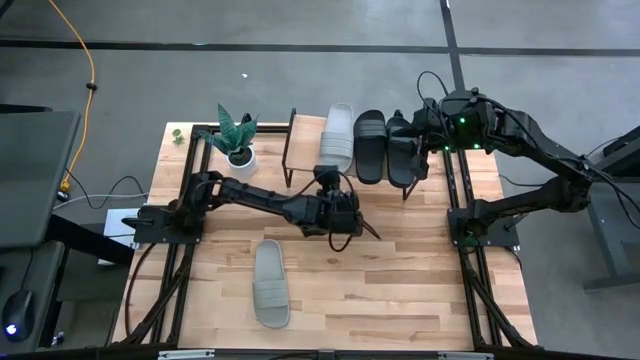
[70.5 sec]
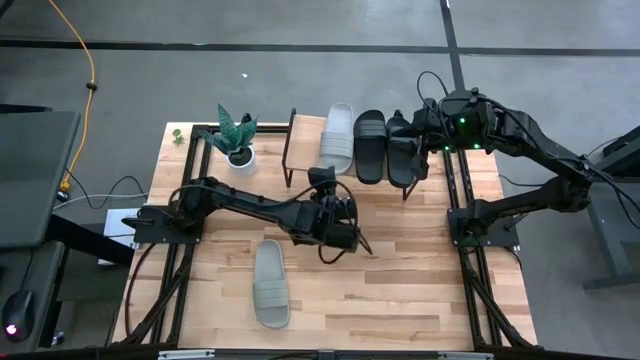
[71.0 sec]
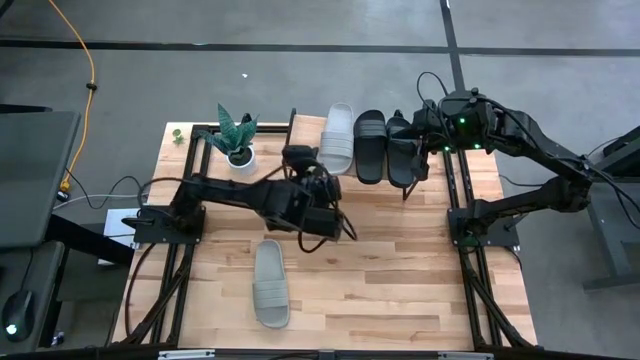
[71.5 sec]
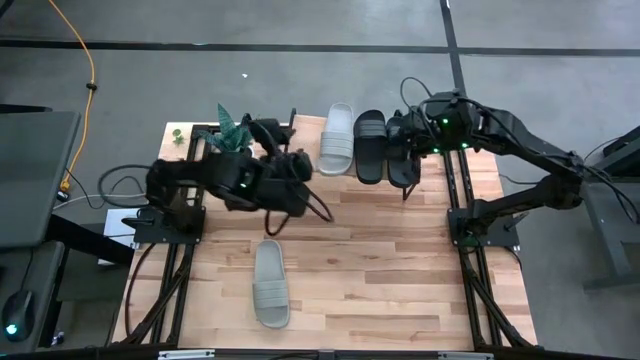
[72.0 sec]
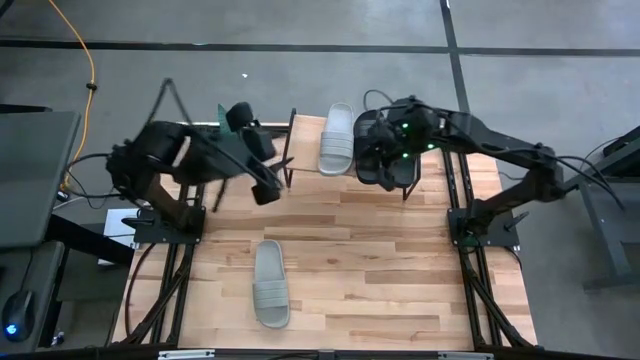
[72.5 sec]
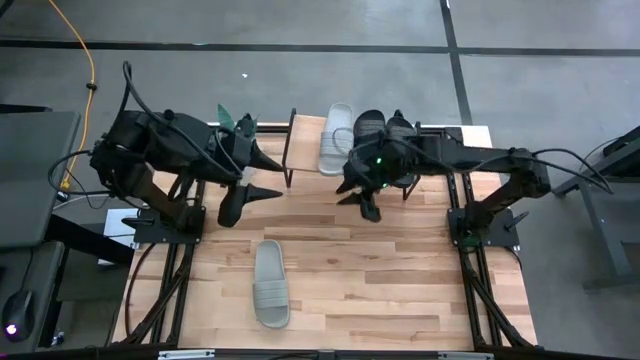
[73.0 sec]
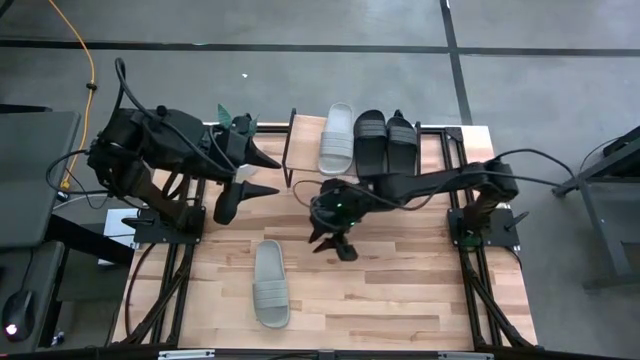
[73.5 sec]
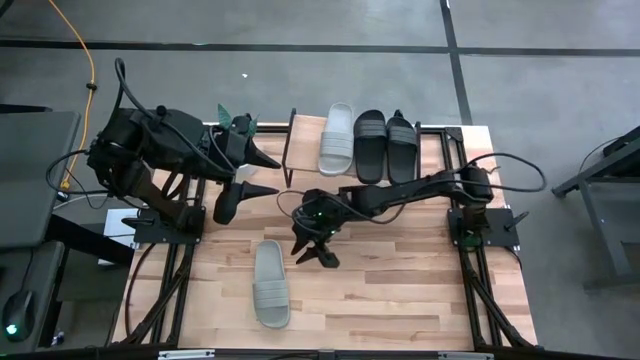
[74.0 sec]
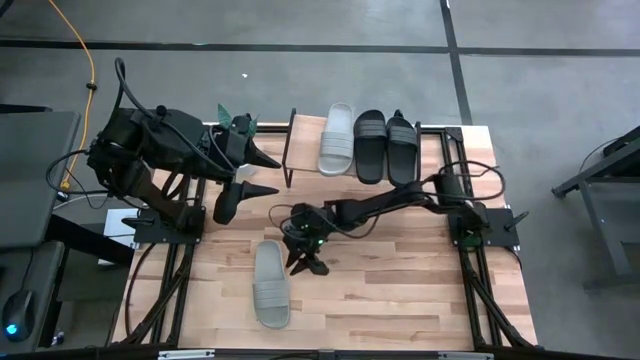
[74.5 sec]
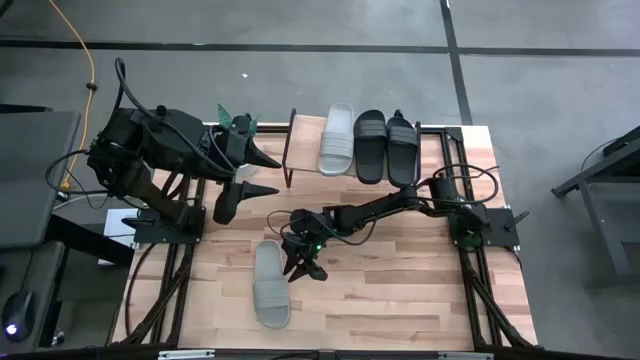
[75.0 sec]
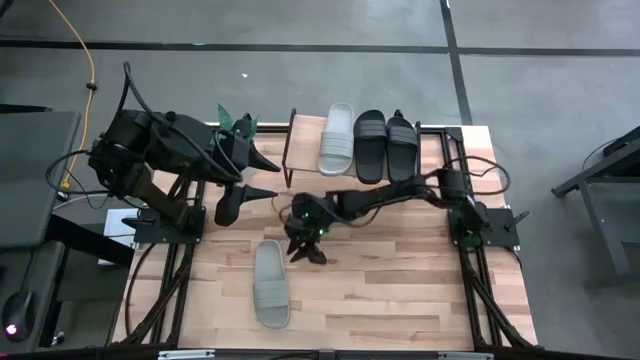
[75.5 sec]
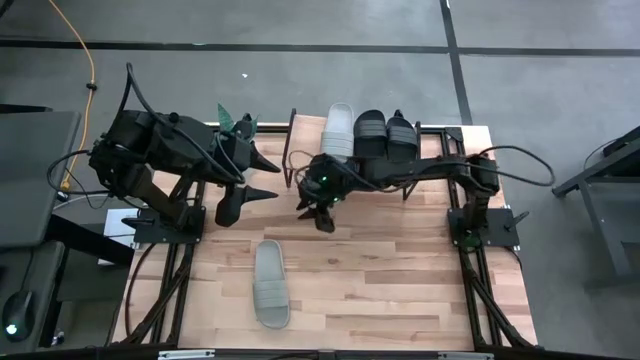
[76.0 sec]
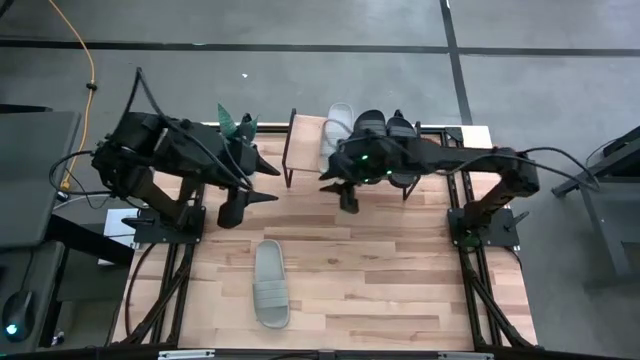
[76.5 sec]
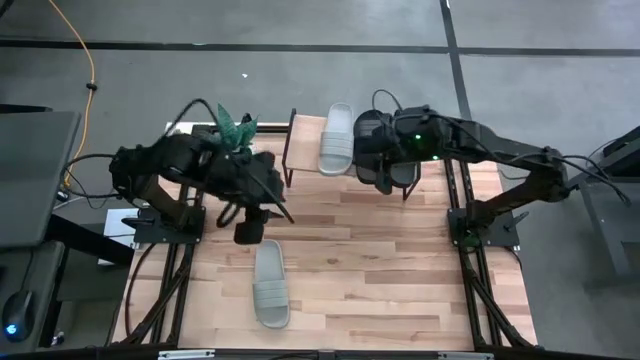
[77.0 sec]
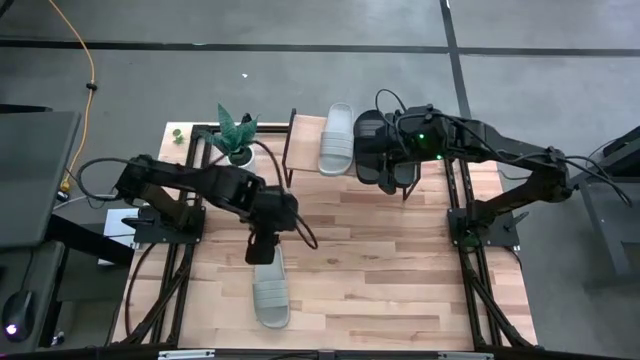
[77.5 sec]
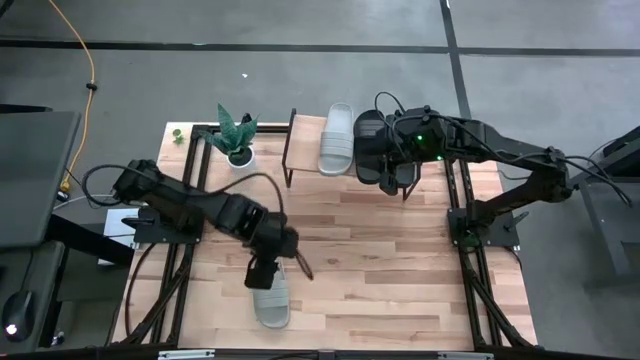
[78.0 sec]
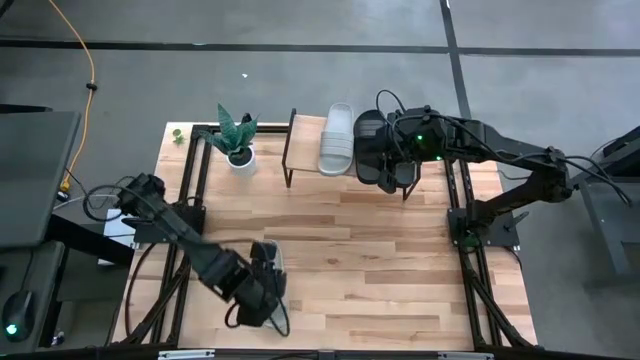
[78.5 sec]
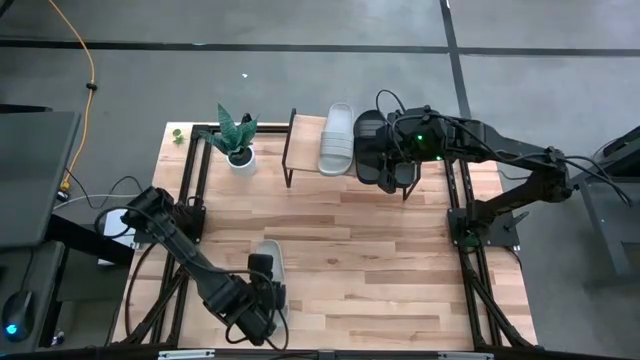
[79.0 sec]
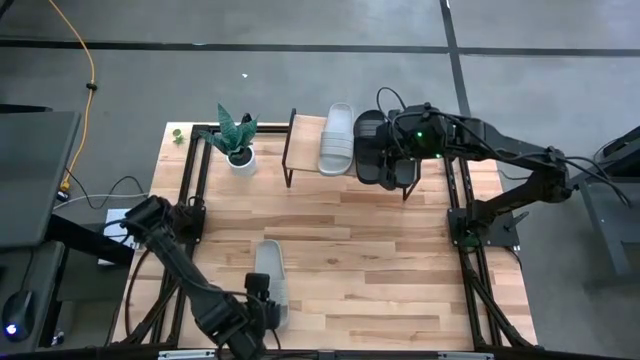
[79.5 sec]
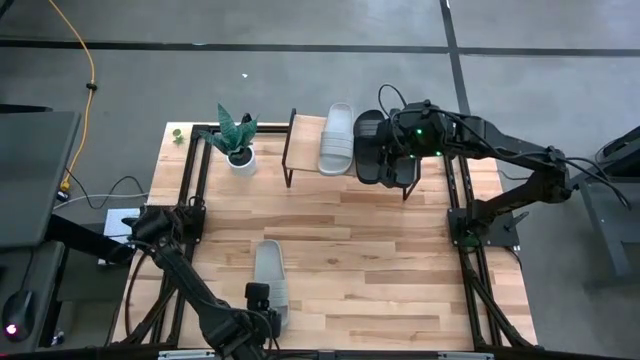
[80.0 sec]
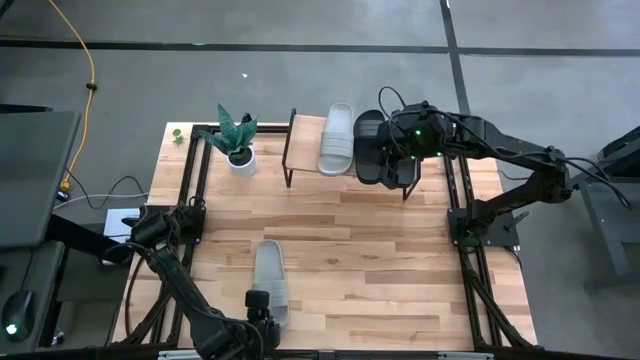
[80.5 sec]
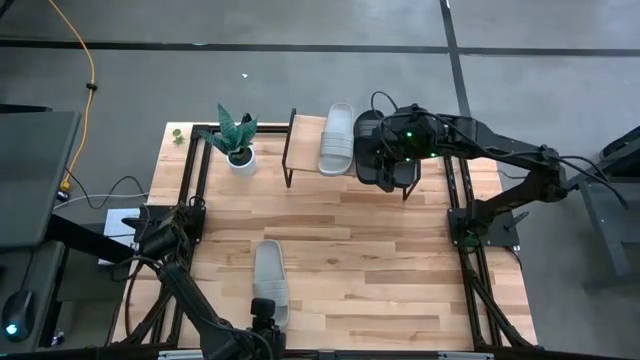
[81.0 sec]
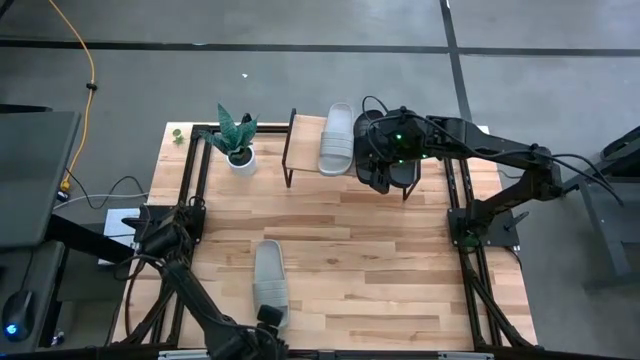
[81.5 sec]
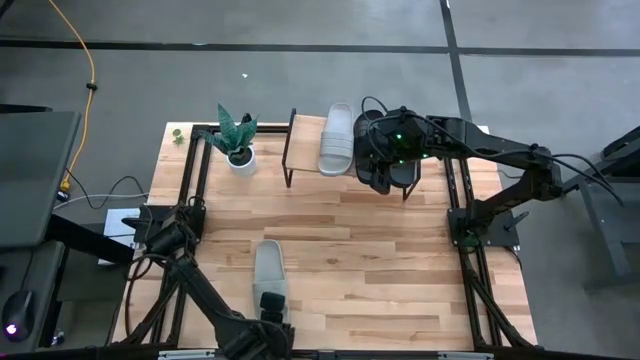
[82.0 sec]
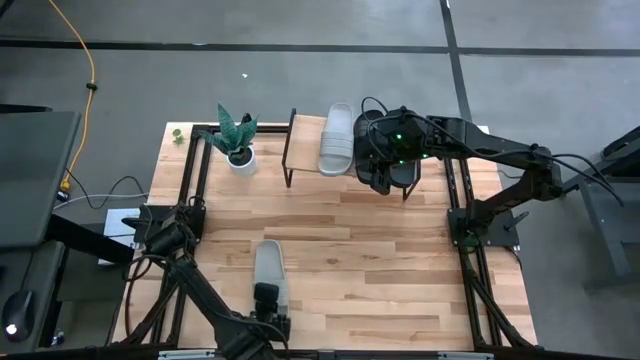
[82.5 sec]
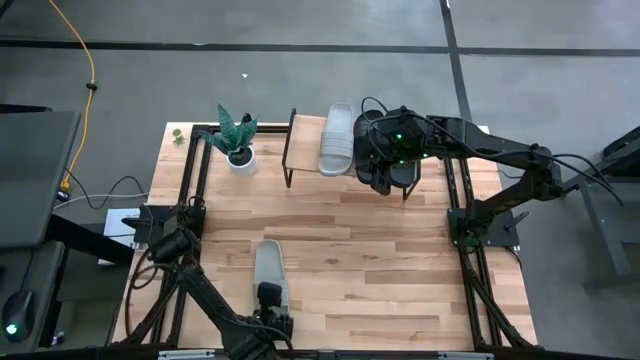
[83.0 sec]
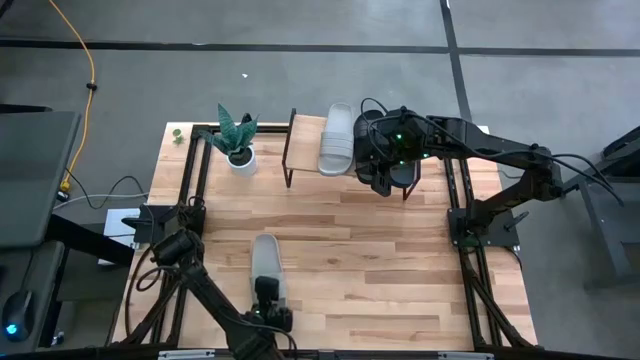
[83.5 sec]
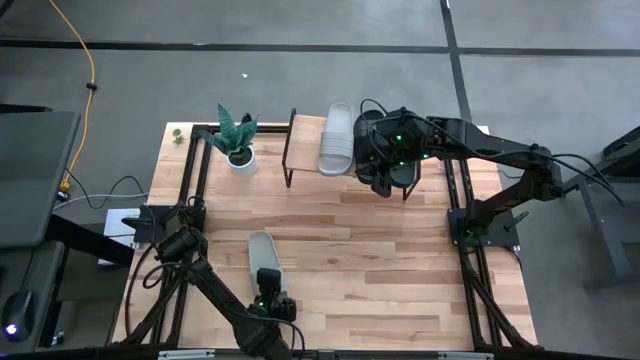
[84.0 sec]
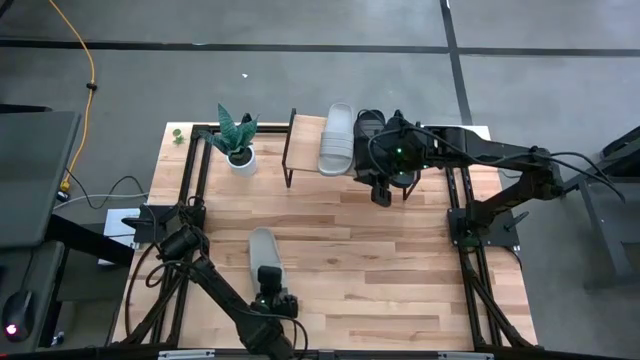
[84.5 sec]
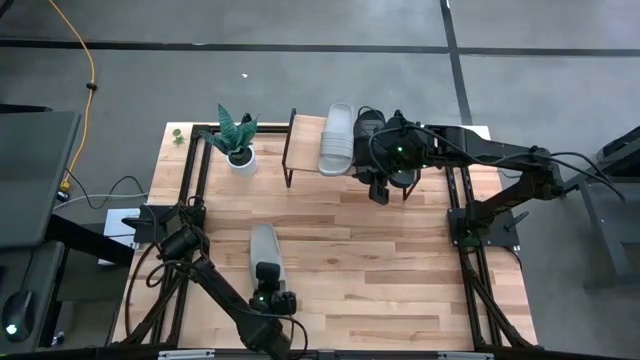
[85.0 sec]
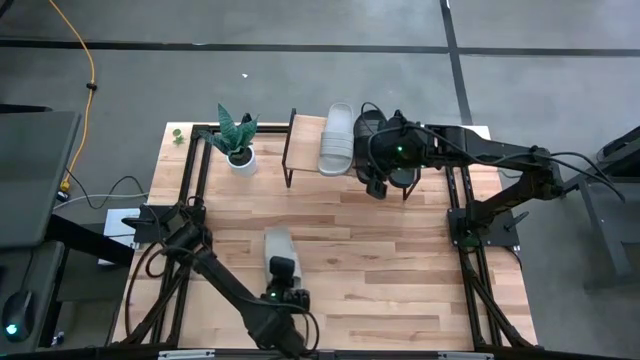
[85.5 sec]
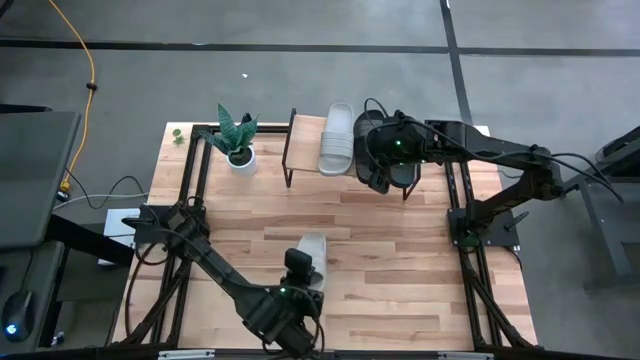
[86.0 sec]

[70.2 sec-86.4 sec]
Task: Pick and place slides into the shelf
Put the gray slide on the shelf

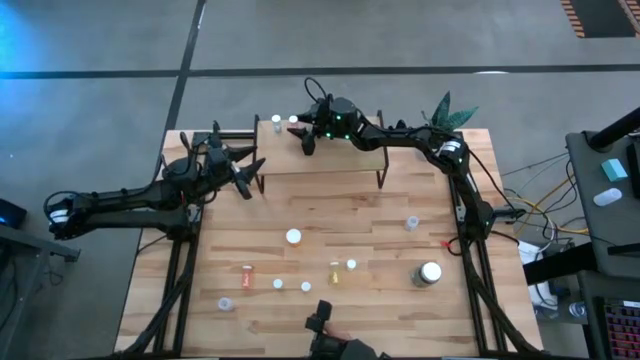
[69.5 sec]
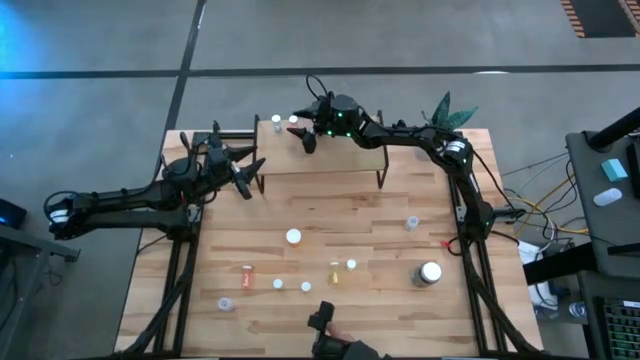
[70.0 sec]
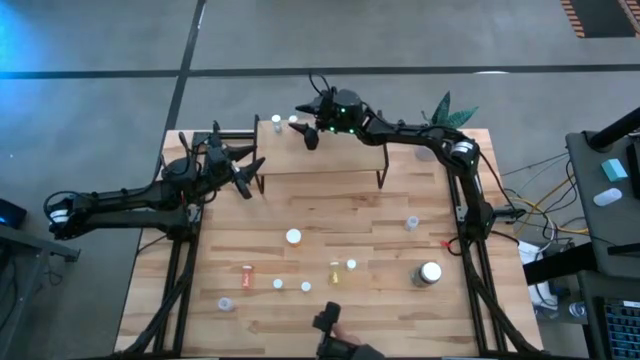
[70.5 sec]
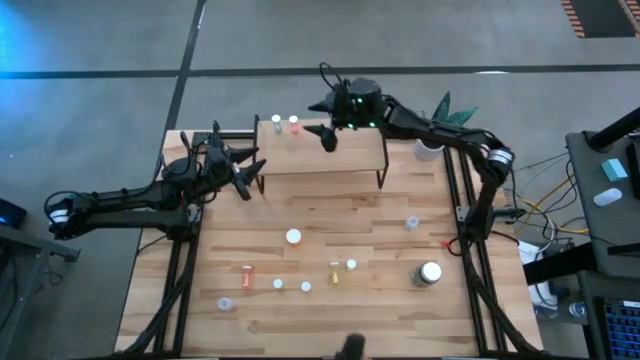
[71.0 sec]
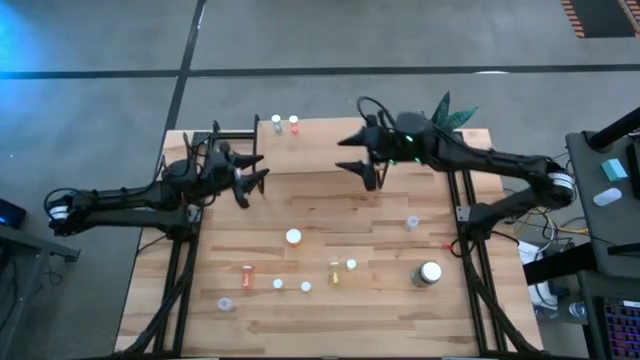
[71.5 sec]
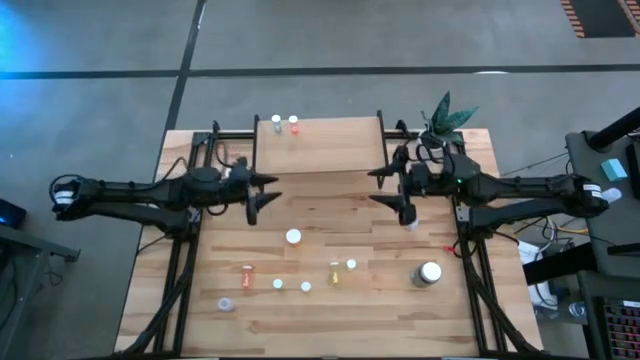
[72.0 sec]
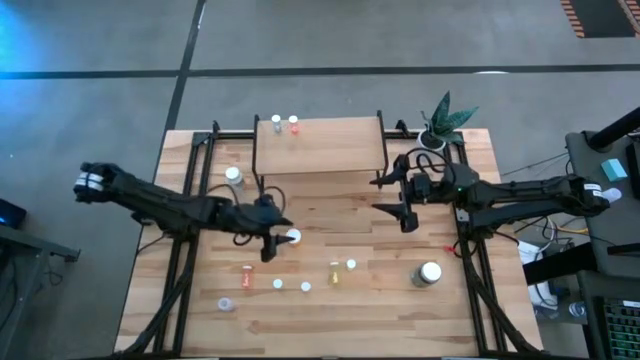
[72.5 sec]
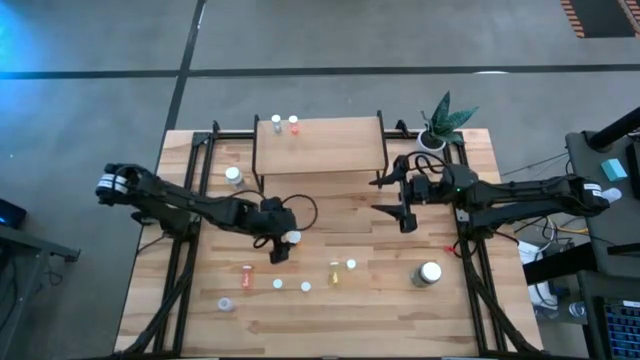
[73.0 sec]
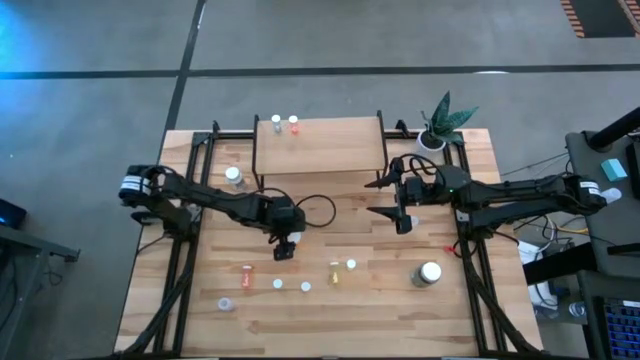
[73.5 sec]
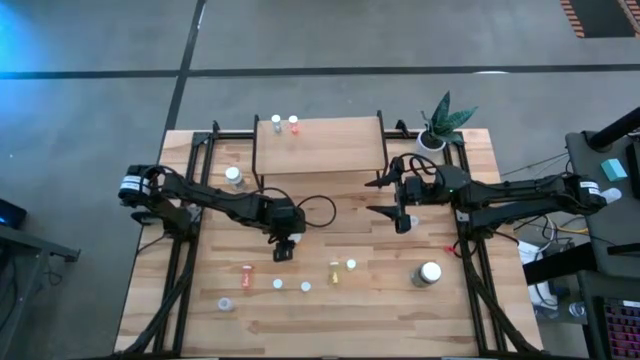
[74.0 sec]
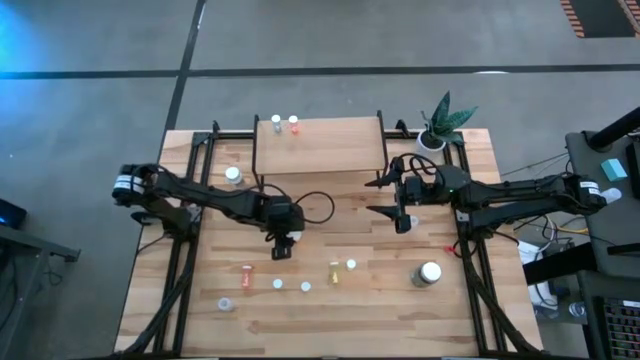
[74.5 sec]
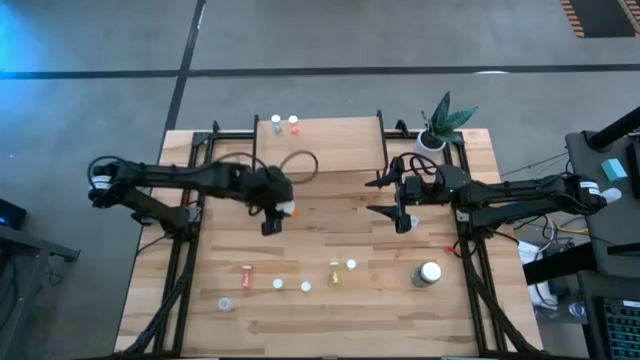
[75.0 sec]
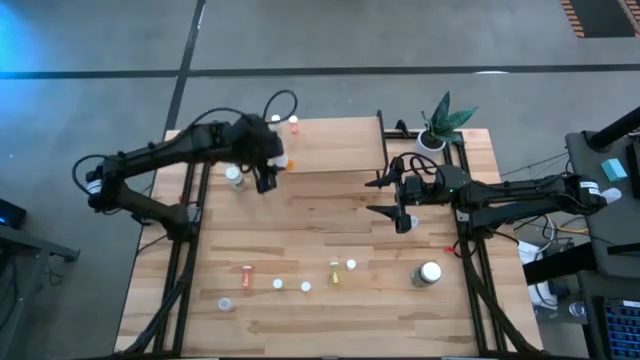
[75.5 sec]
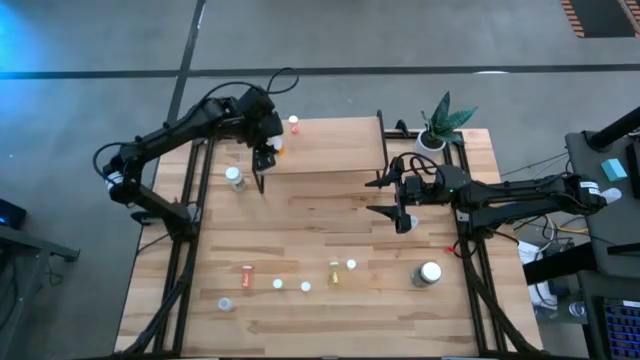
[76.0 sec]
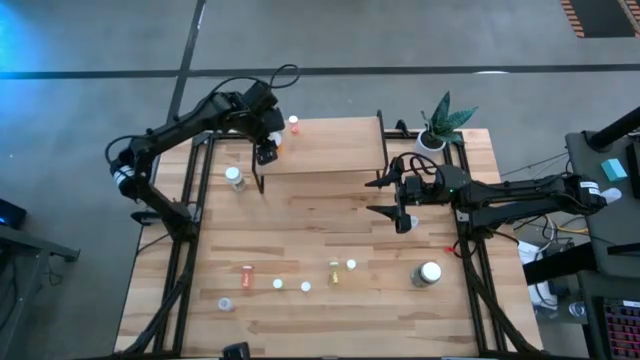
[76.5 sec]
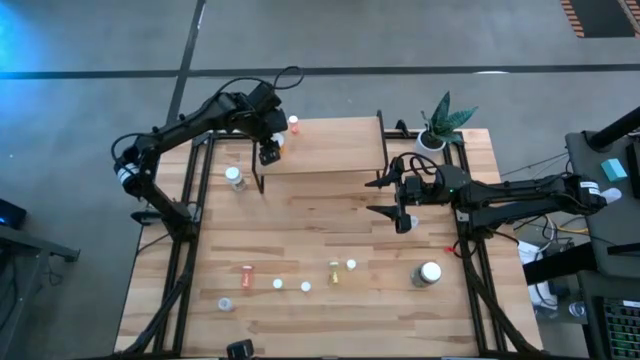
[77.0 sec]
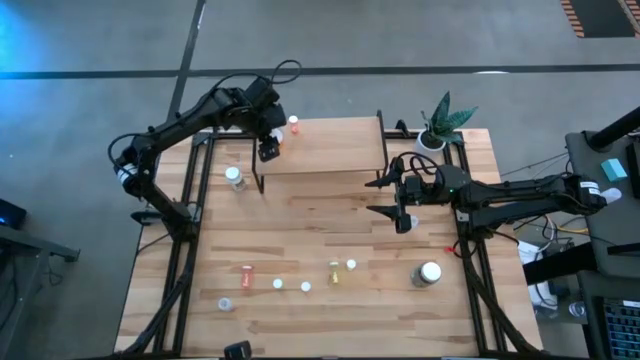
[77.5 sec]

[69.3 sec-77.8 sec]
Task: Pick and place medicine bottles onto shelf by color
Put the orange medicine bottle on the shelf
